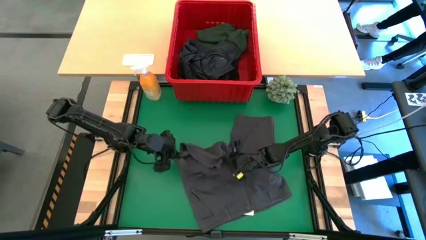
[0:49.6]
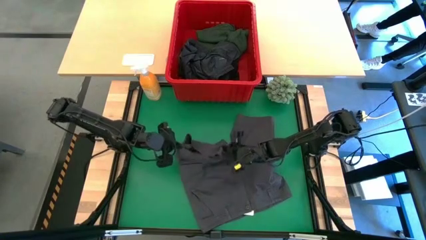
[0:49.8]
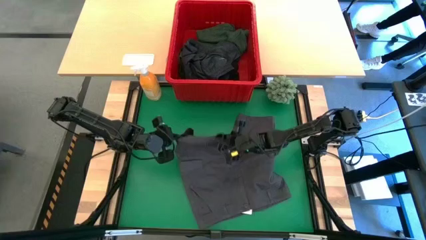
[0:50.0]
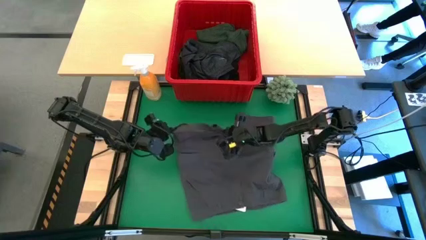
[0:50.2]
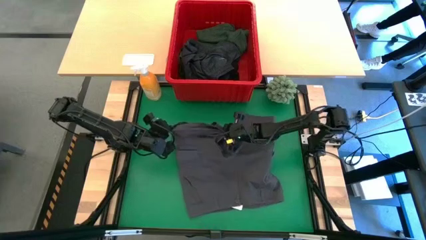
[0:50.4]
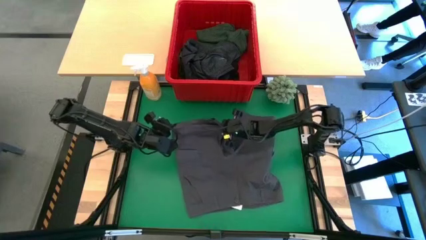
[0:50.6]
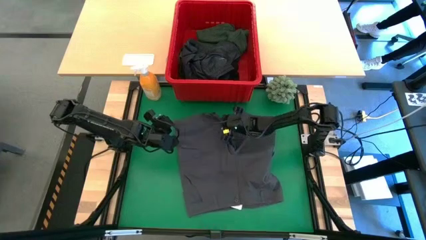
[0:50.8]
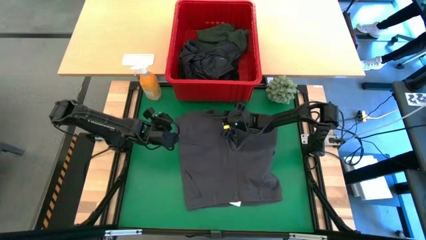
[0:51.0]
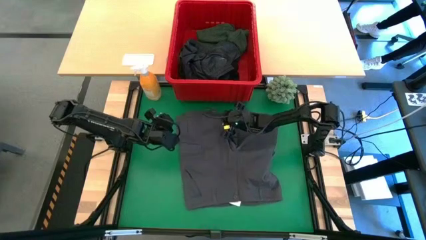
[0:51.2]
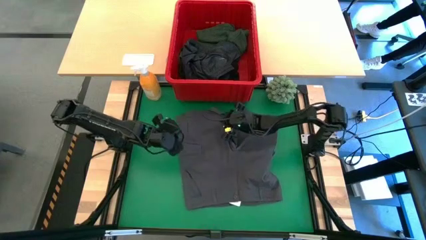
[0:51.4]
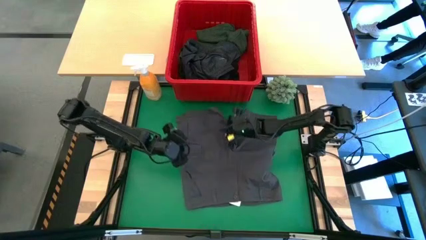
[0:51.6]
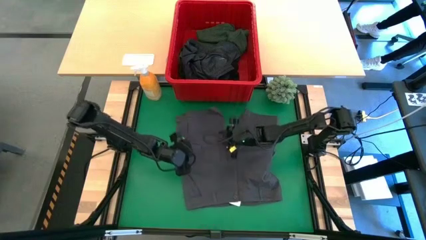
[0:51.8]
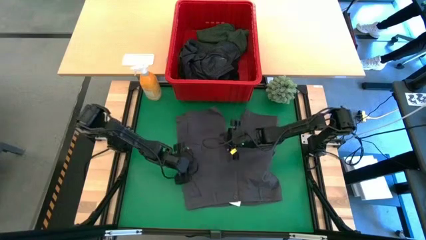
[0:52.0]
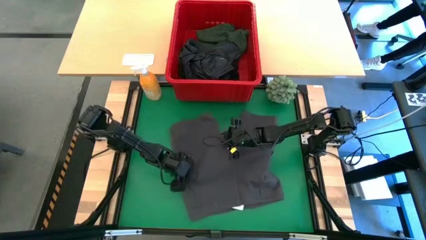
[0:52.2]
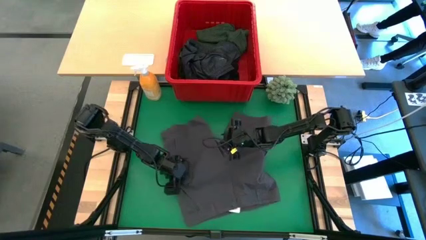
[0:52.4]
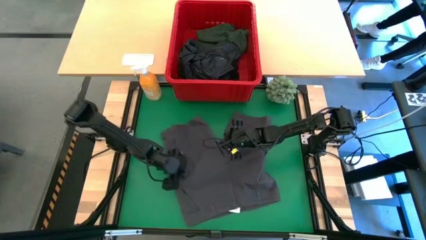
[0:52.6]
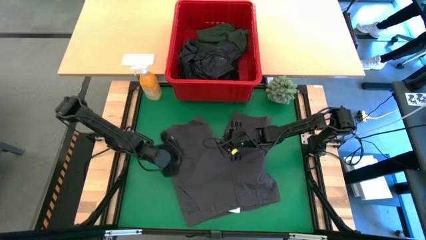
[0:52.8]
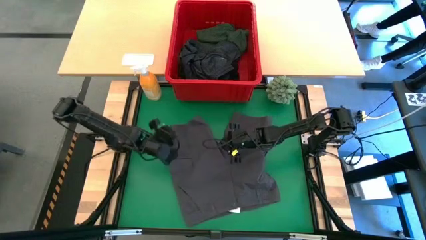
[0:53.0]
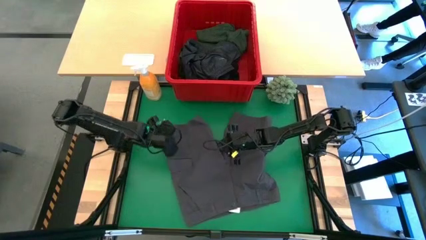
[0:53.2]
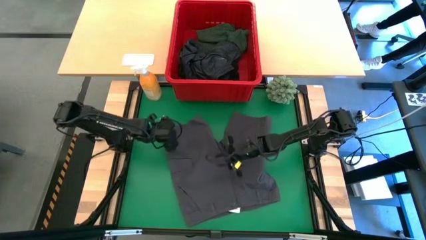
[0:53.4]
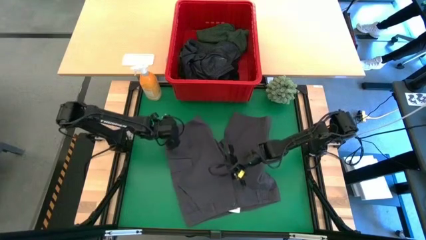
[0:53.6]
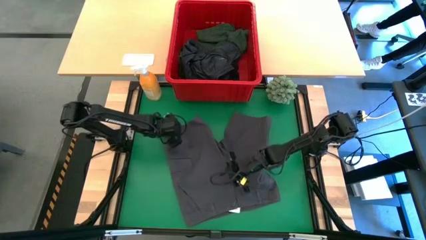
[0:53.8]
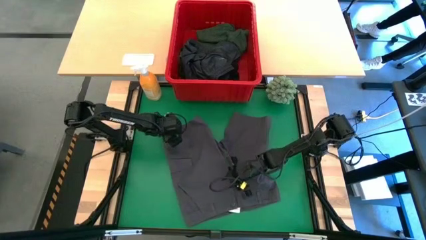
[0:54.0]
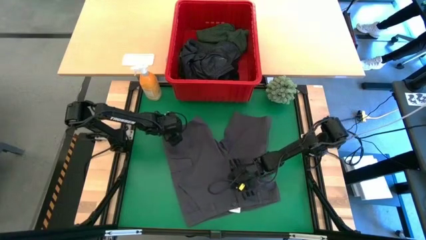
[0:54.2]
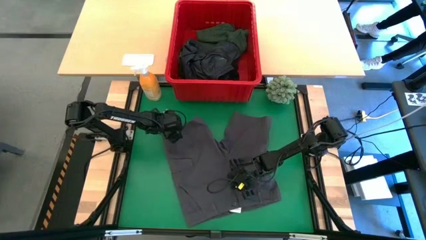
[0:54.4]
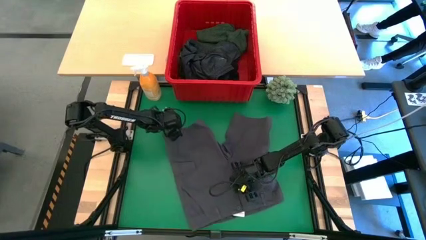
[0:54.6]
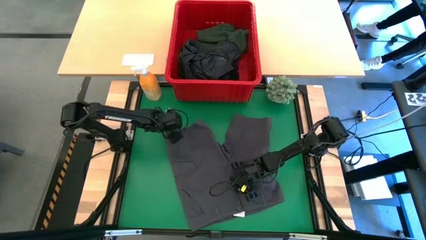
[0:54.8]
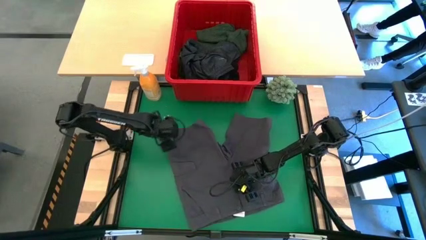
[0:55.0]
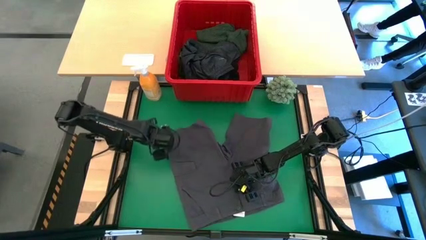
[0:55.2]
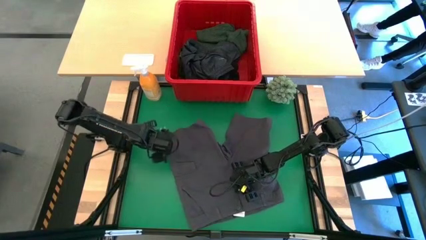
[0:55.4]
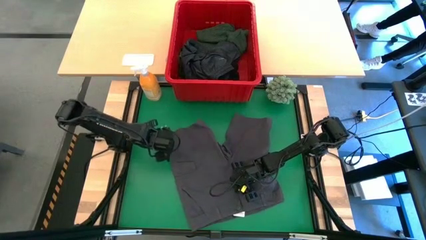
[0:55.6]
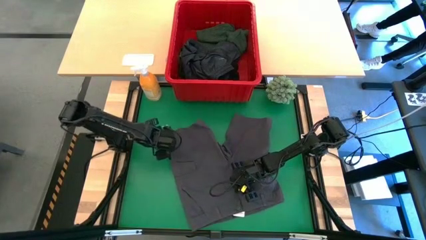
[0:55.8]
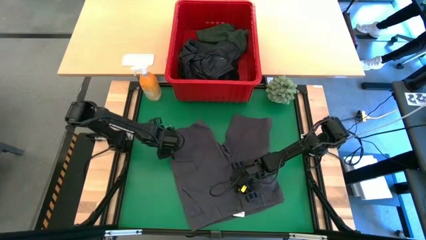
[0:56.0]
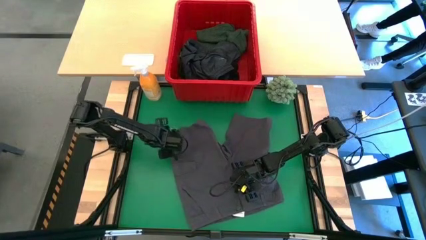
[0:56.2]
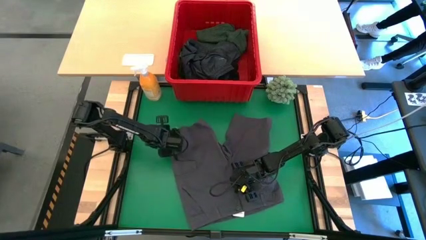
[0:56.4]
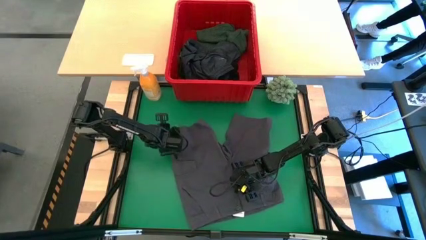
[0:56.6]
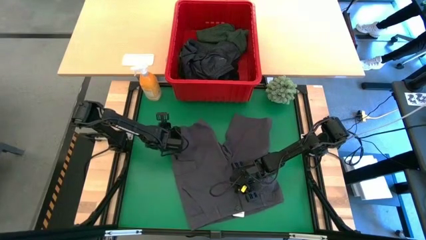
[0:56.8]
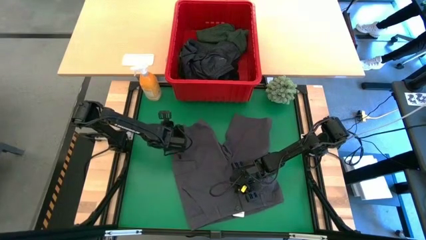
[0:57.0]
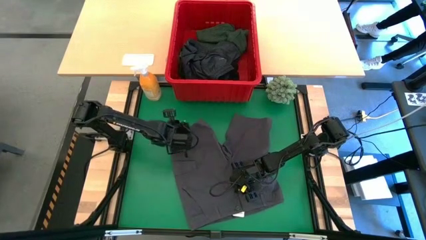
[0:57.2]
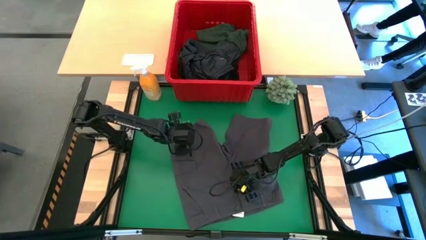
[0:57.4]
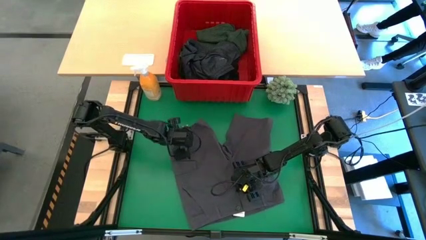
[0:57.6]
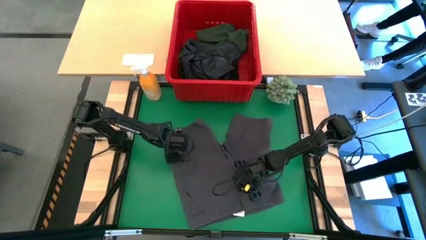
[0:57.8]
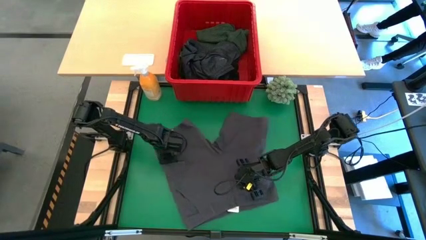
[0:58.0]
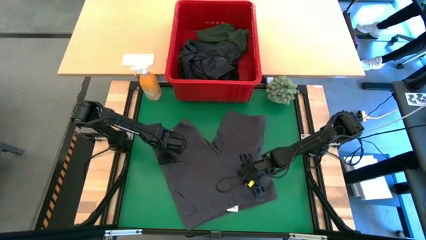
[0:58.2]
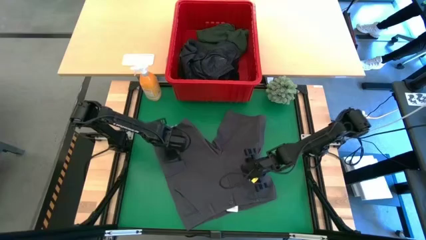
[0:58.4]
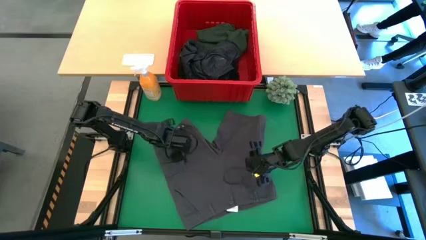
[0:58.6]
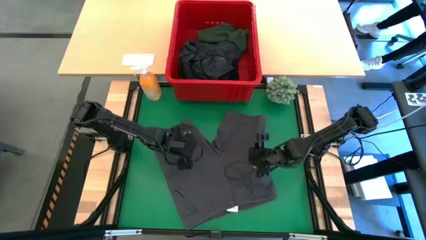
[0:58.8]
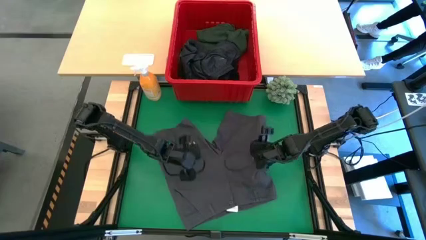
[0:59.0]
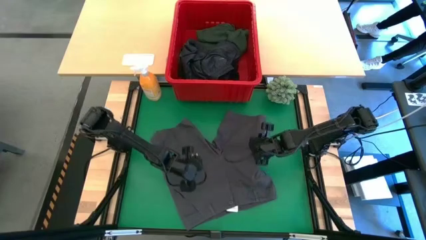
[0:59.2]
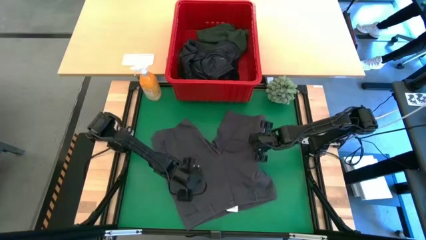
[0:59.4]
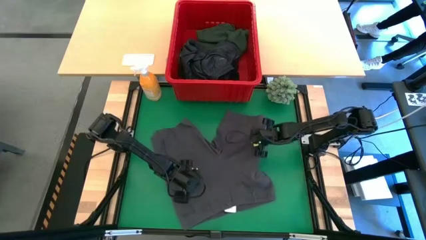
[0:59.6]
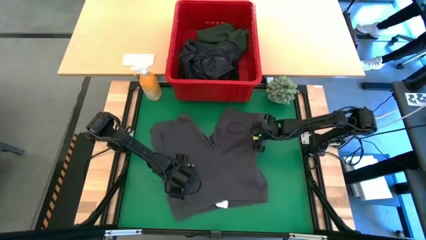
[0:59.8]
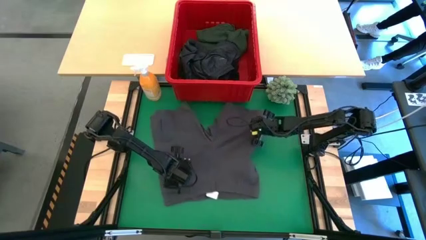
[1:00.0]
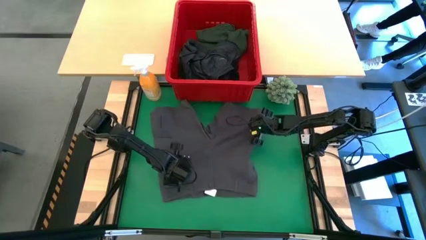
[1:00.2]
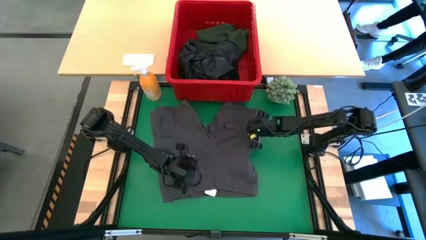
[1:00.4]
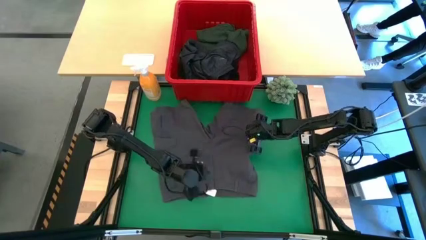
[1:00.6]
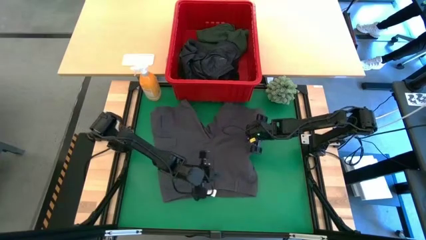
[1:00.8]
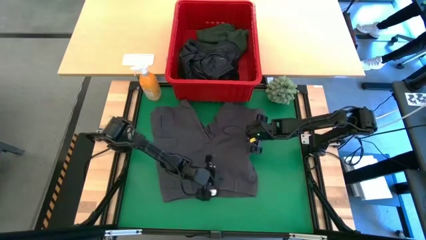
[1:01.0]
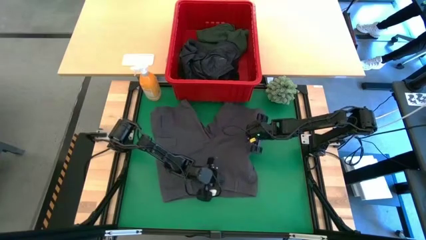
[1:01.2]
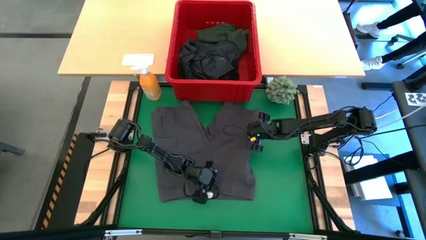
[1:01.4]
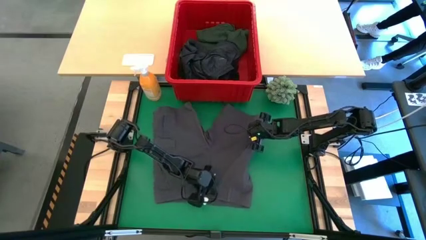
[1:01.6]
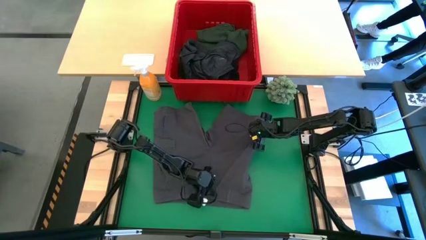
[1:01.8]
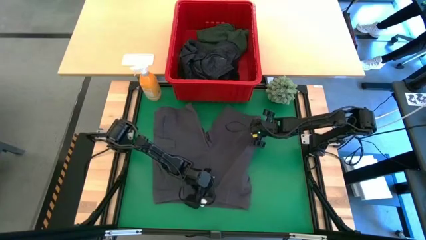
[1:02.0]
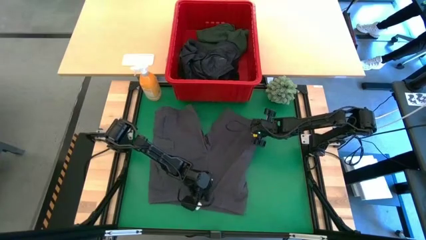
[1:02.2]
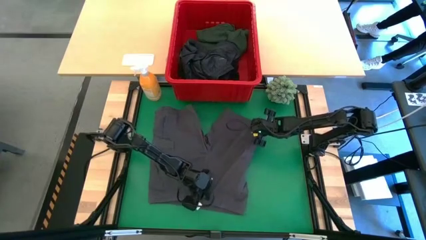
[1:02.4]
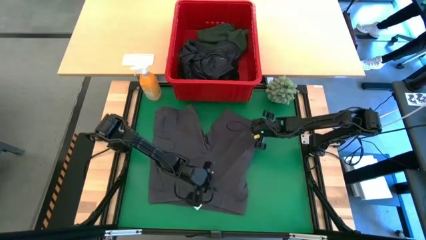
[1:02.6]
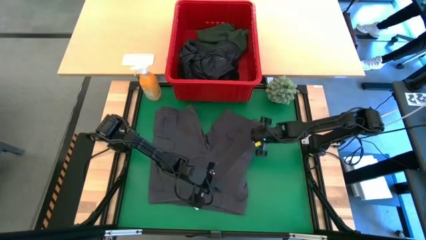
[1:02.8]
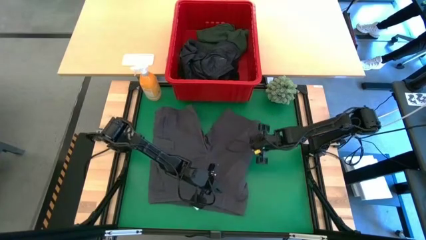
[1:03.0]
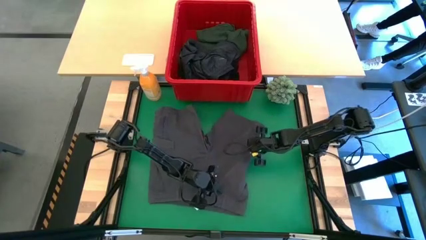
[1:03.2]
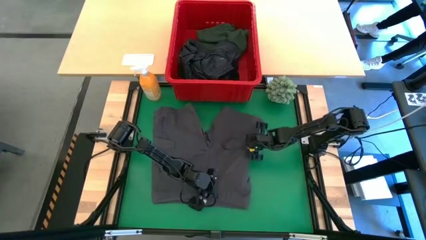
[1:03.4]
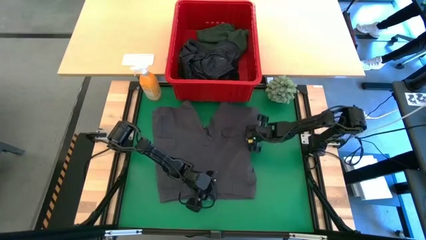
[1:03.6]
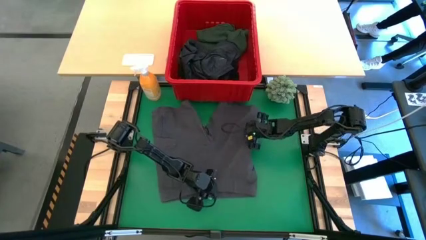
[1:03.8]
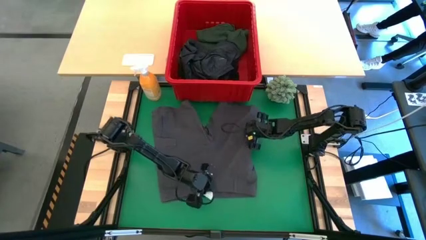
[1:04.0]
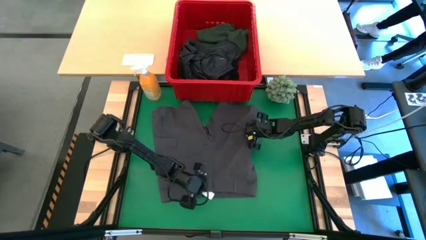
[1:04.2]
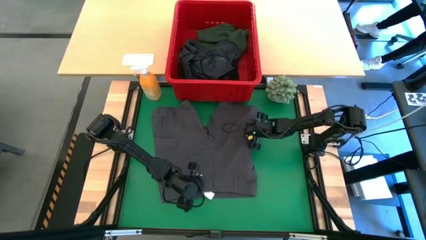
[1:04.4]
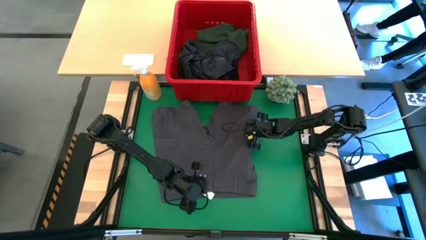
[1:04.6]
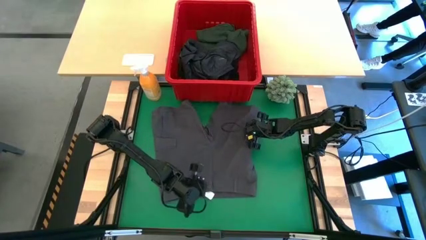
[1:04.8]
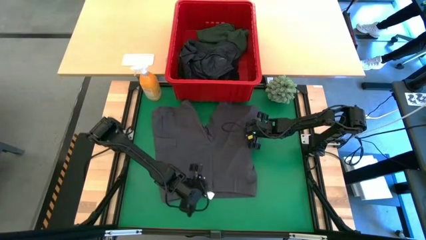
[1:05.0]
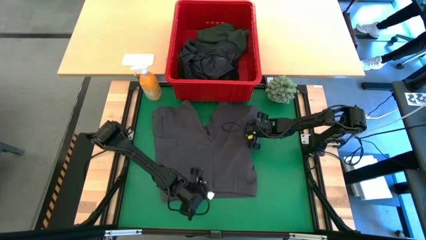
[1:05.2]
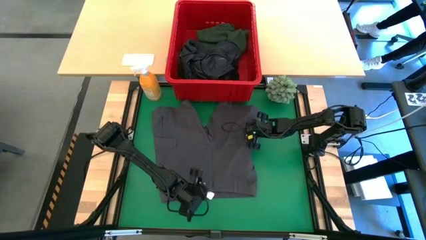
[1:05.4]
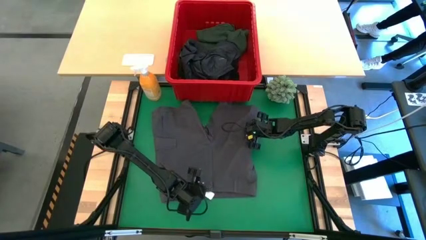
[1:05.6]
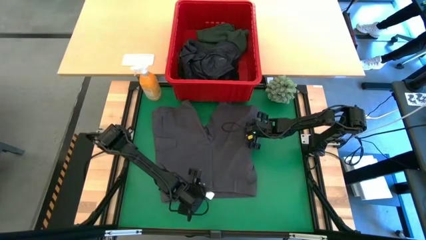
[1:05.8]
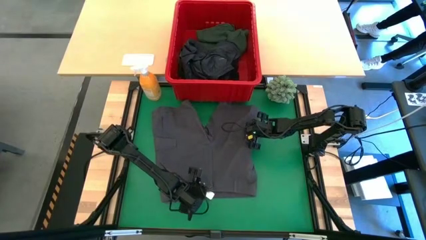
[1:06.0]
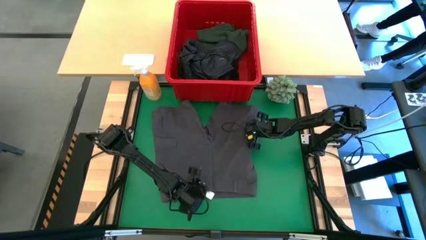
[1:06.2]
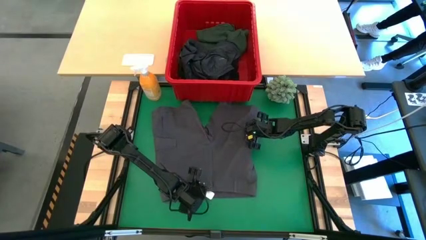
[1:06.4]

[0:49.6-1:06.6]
Task: Fold Laundry from Bin
Fold the gray short

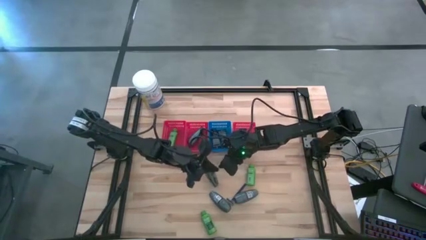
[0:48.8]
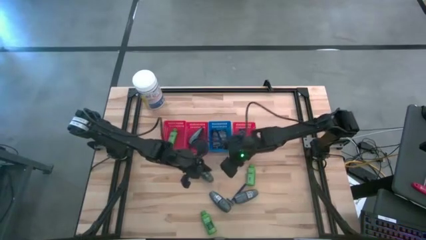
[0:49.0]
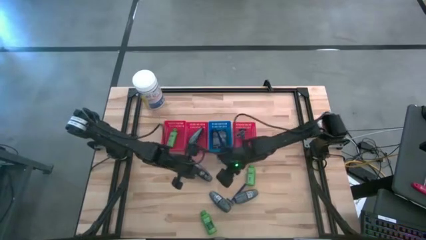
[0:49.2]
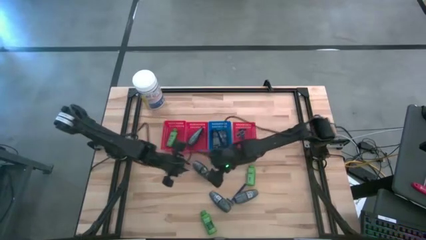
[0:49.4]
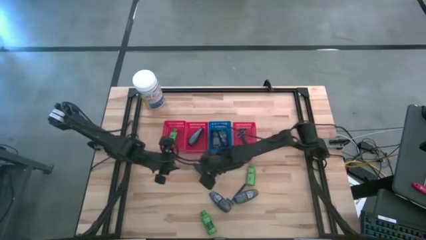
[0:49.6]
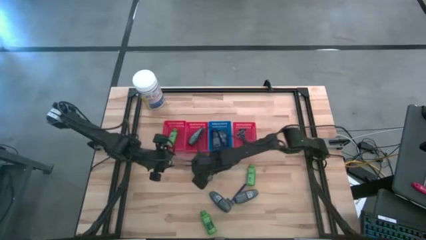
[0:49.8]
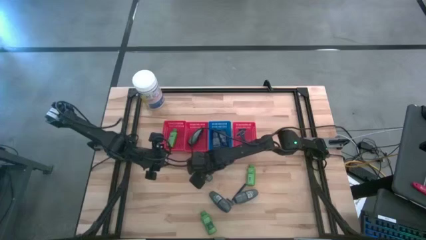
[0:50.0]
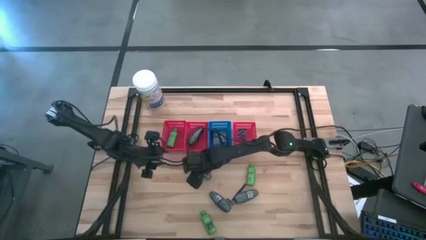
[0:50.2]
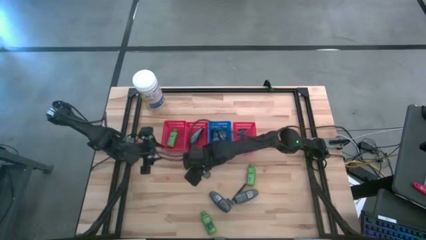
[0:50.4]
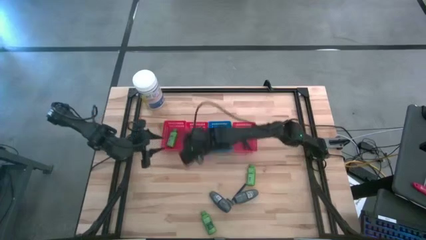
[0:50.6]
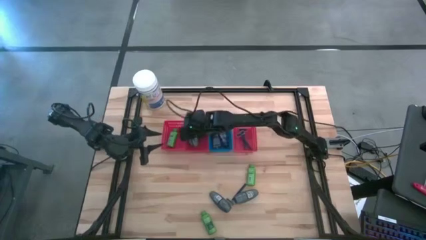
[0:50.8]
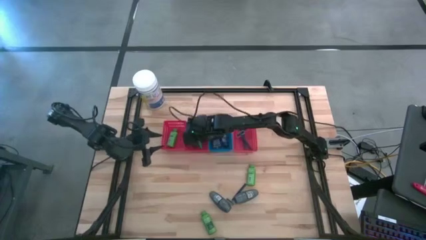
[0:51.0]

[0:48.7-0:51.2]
Task: Pick & Place Travel size toiletries
Put the gray deodorant into the middle red bin
